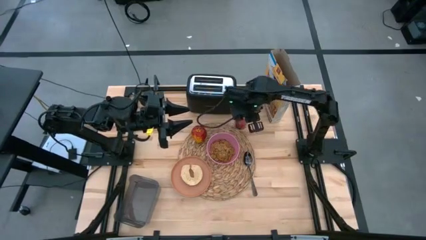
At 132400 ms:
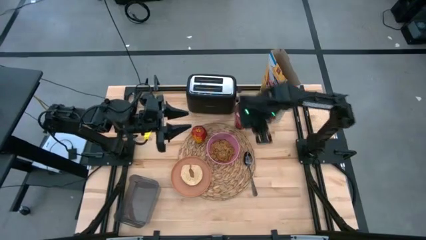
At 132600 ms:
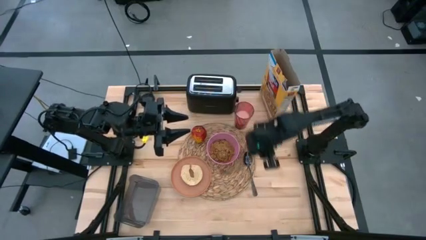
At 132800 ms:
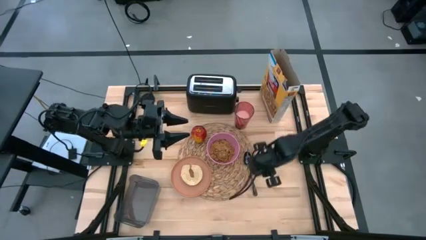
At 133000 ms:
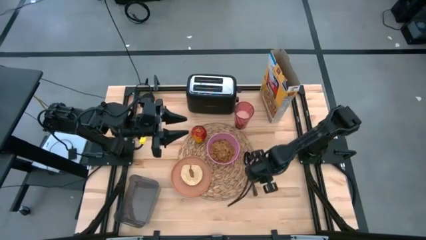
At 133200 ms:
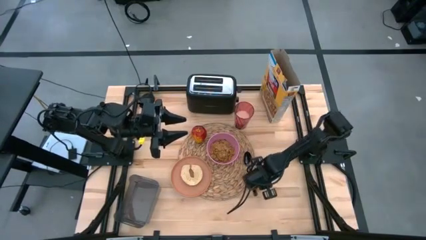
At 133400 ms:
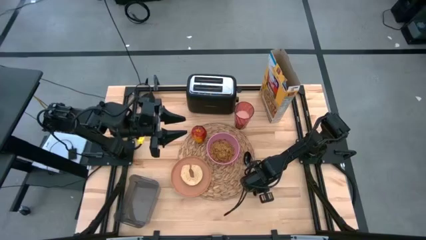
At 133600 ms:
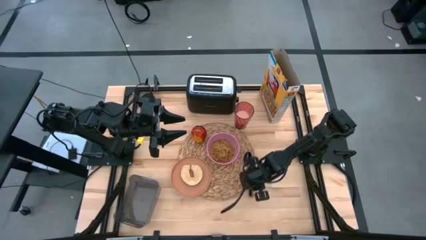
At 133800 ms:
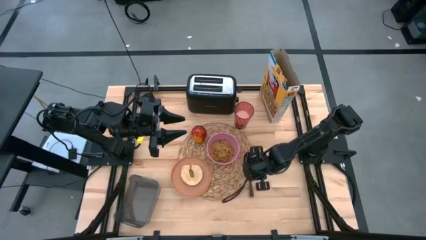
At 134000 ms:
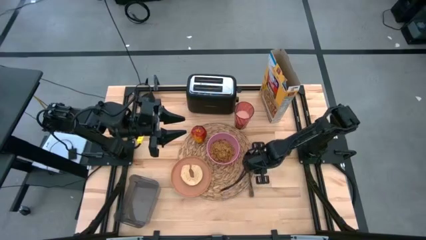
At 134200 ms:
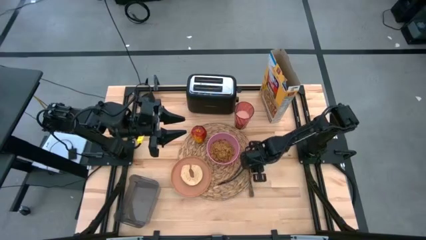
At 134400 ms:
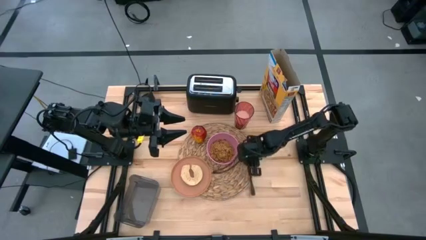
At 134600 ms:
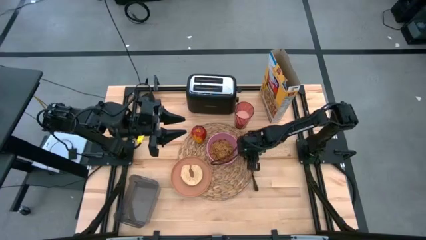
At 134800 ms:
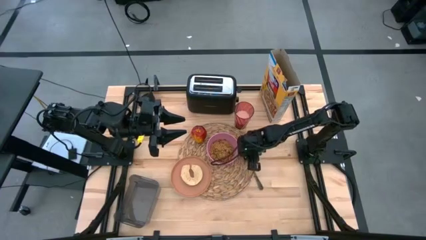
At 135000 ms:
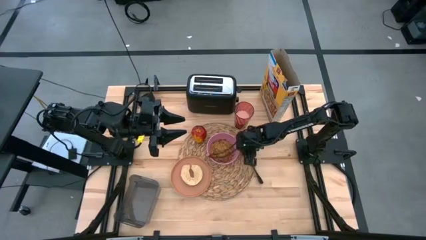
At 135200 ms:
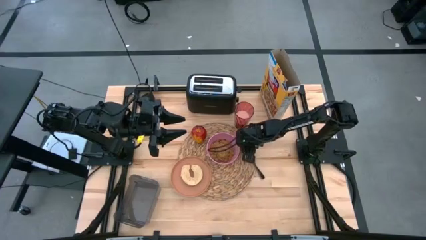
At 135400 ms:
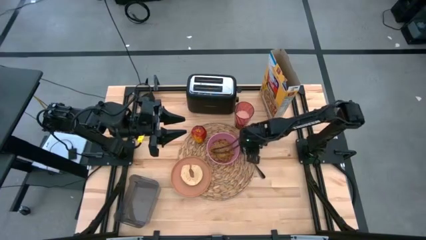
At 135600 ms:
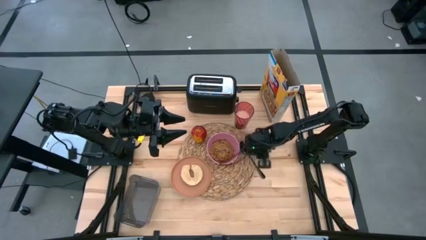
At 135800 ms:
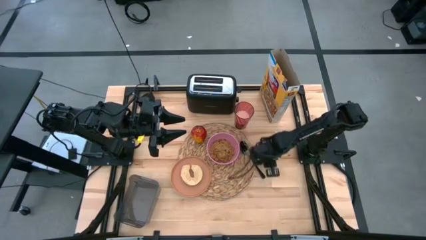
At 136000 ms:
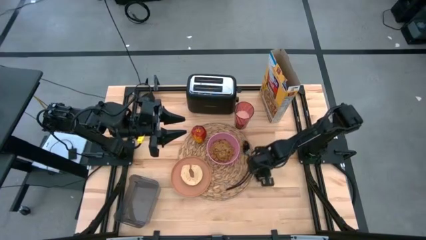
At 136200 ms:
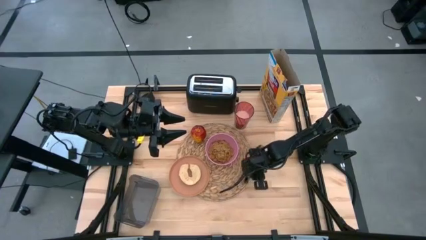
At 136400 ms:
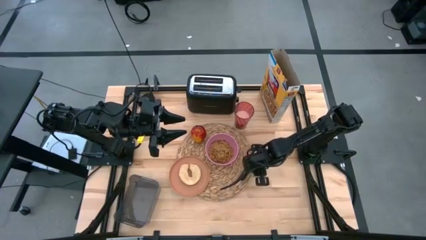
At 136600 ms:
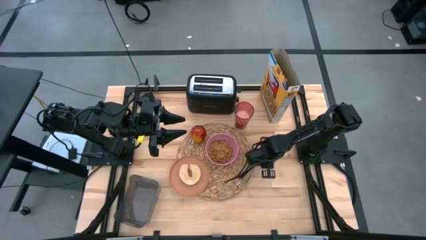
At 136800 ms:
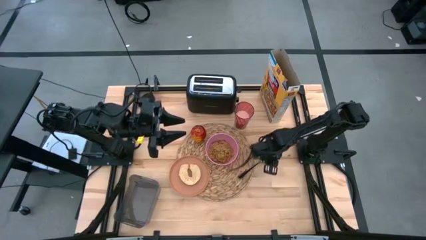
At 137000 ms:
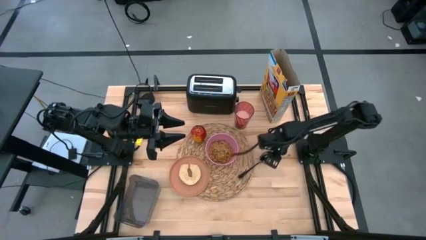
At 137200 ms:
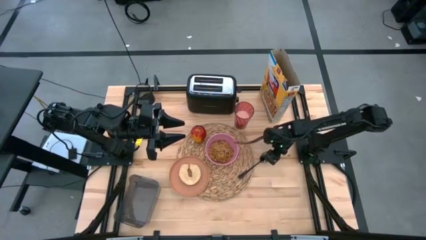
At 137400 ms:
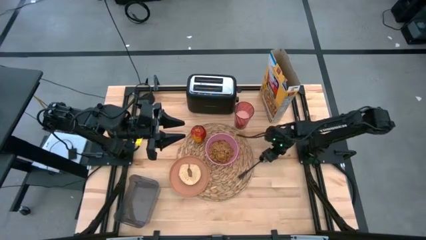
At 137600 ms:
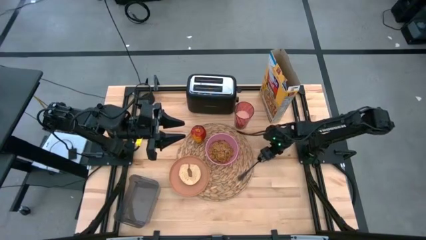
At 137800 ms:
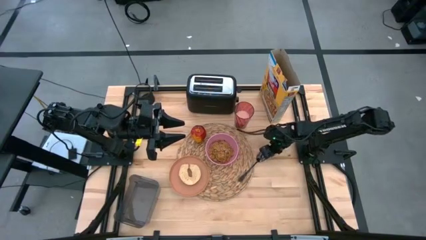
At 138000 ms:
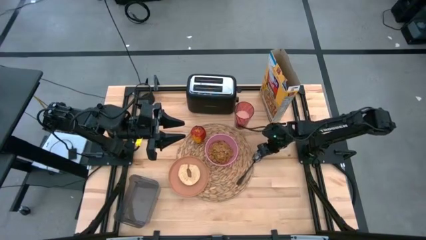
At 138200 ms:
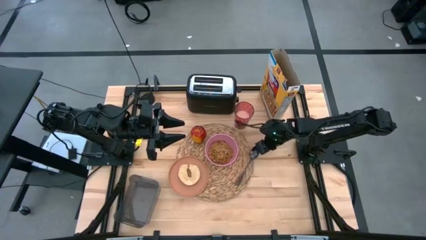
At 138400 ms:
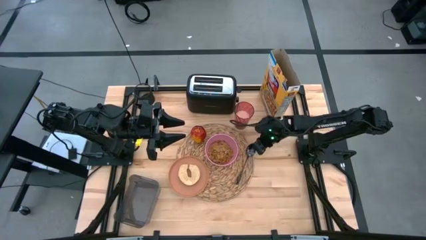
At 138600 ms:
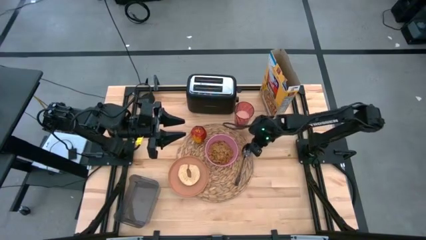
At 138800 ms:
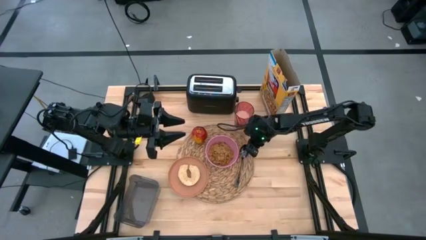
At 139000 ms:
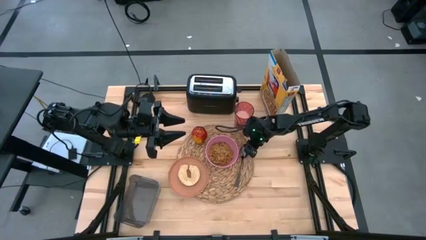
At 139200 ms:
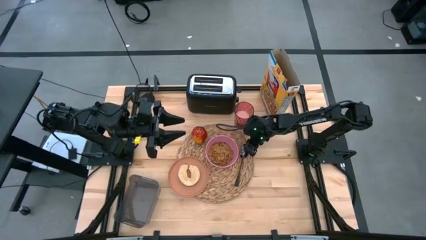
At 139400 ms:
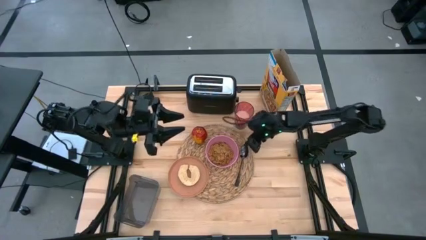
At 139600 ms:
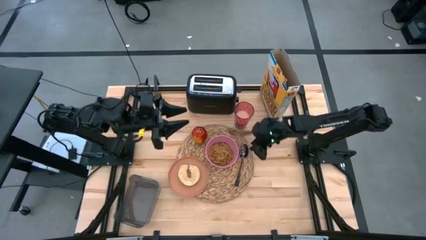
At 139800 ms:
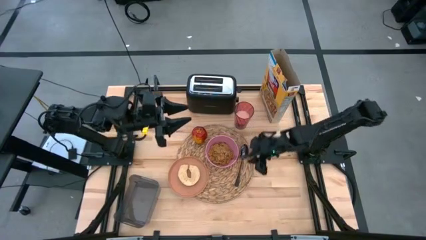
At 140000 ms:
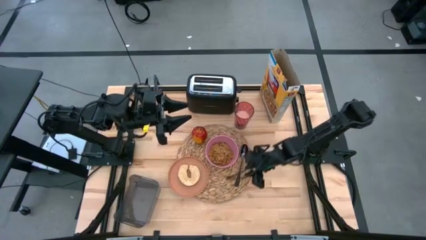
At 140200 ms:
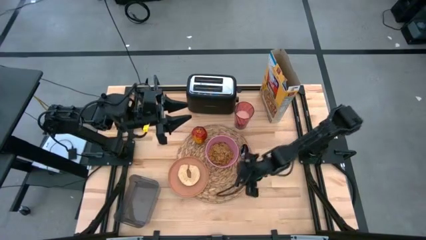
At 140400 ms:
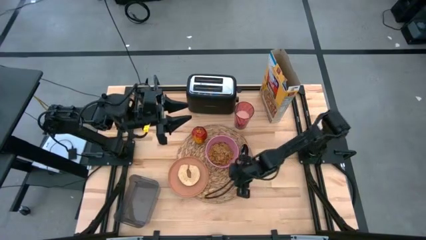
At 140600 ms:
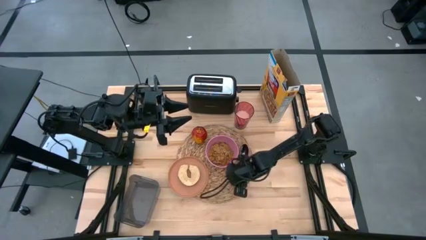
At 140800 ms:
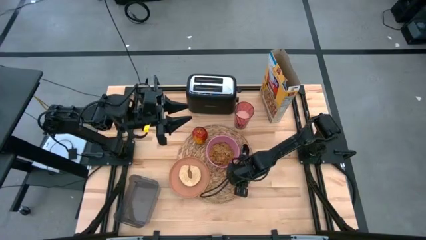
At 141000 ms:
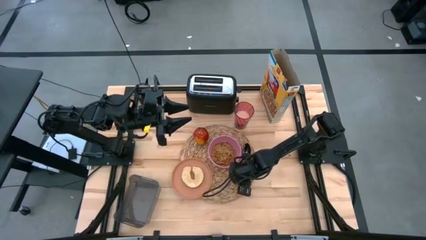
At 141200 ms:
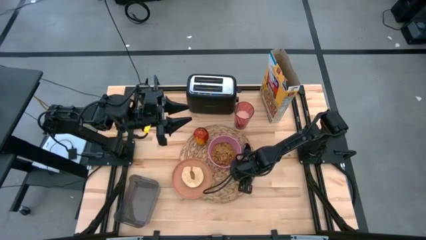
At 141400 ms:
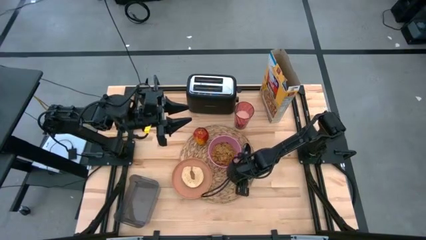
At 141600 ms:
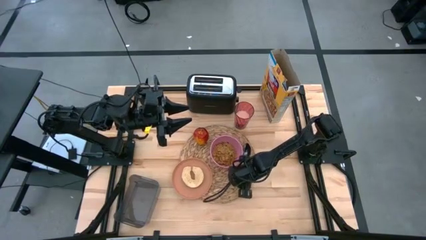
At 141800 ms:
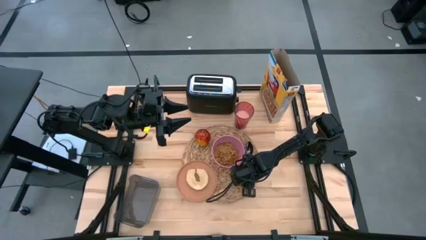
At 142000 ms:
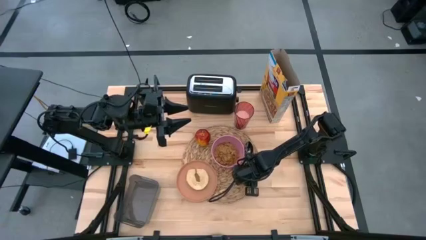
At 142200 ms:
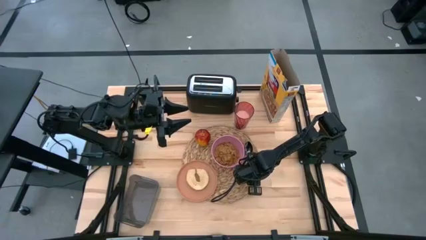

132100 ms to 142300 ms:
Task: Arrange a breakfast setting
Adjust the black spoon beside the pink bowl

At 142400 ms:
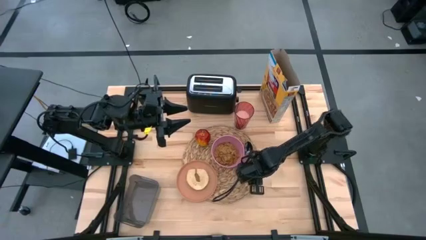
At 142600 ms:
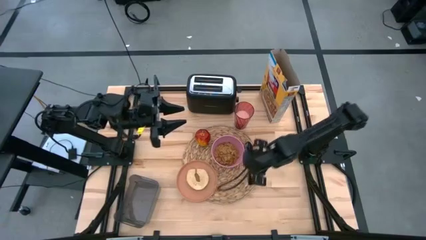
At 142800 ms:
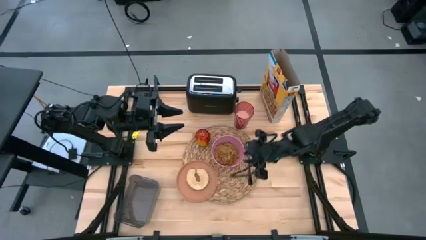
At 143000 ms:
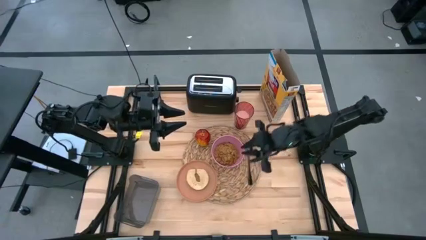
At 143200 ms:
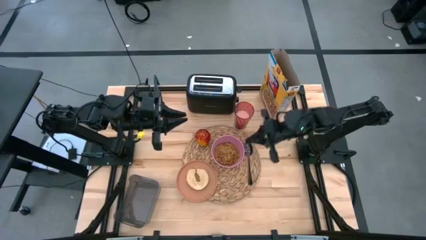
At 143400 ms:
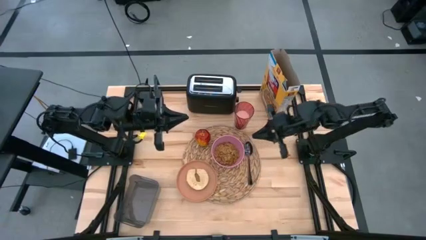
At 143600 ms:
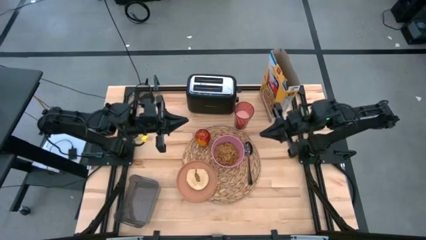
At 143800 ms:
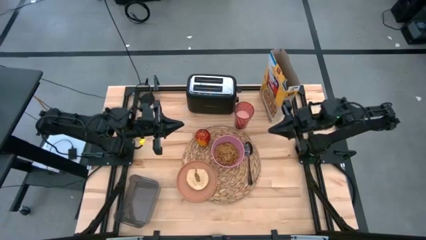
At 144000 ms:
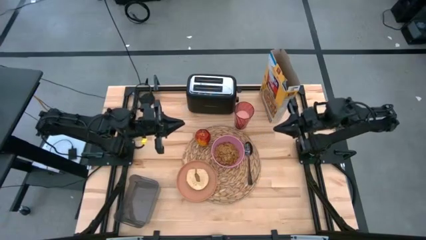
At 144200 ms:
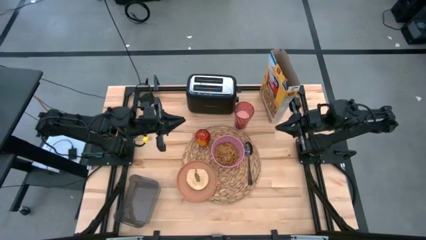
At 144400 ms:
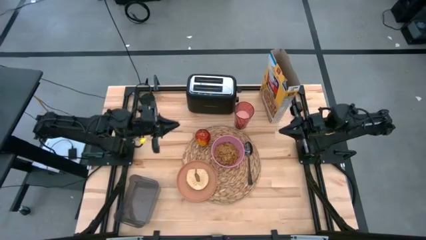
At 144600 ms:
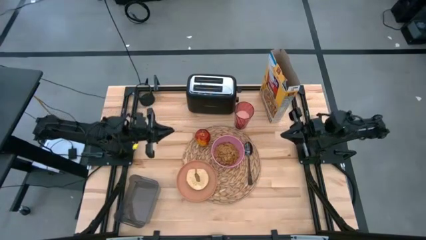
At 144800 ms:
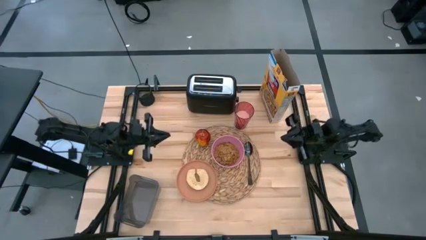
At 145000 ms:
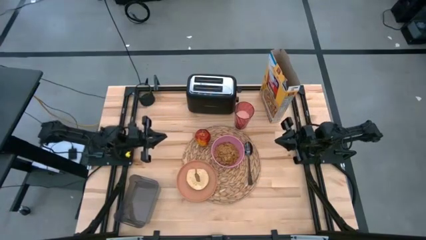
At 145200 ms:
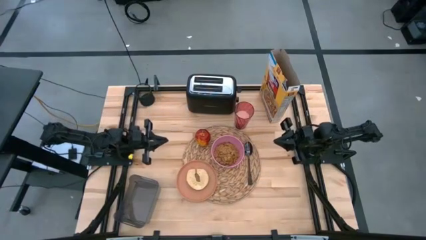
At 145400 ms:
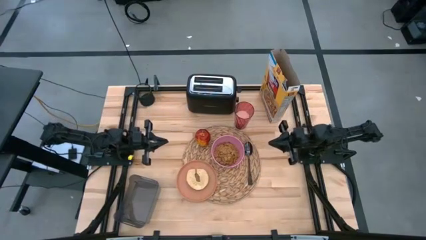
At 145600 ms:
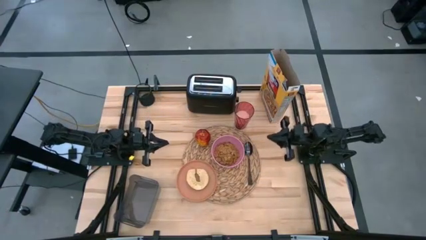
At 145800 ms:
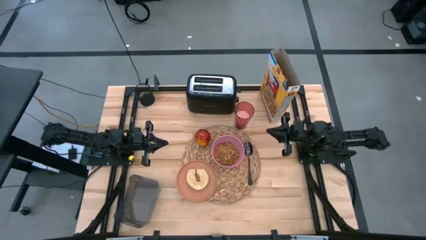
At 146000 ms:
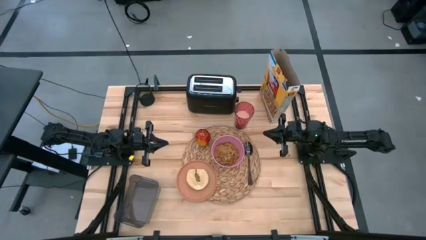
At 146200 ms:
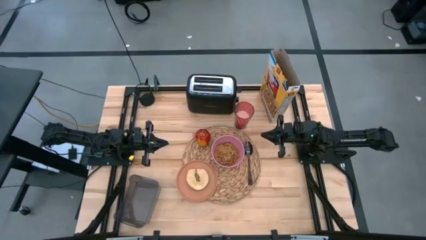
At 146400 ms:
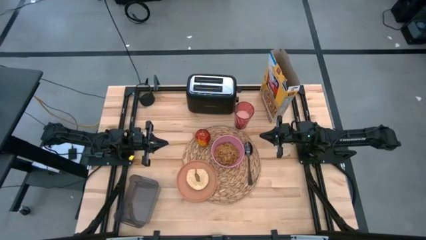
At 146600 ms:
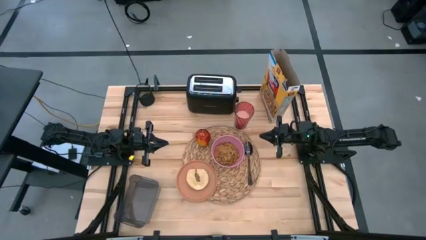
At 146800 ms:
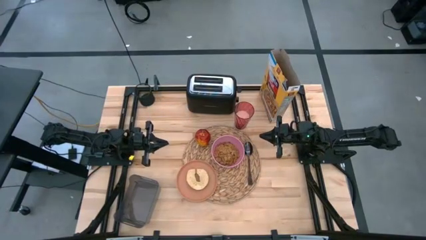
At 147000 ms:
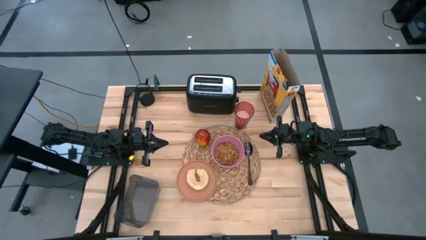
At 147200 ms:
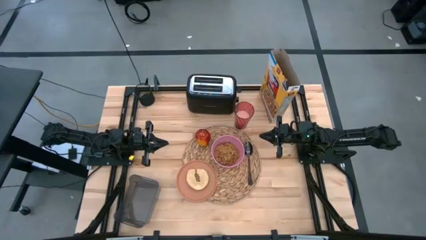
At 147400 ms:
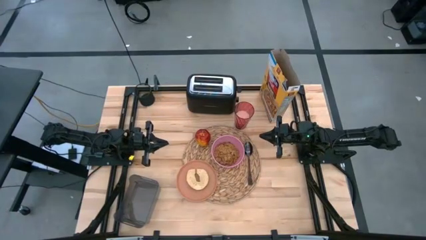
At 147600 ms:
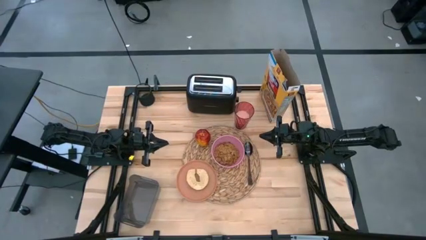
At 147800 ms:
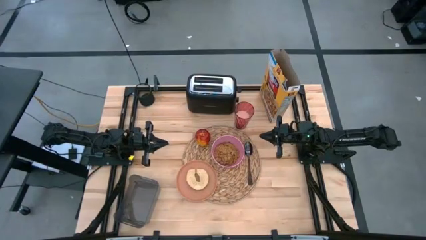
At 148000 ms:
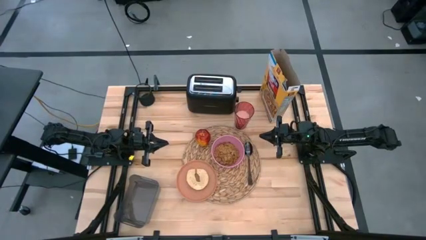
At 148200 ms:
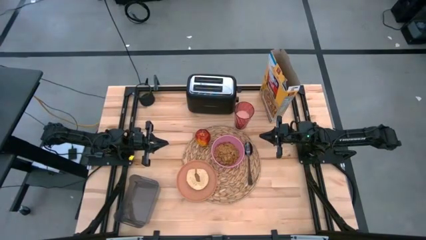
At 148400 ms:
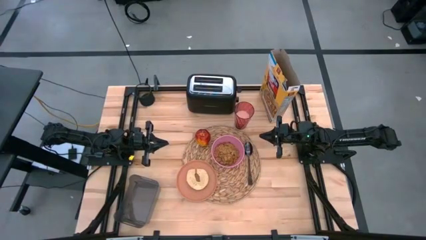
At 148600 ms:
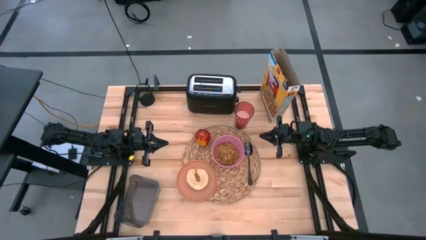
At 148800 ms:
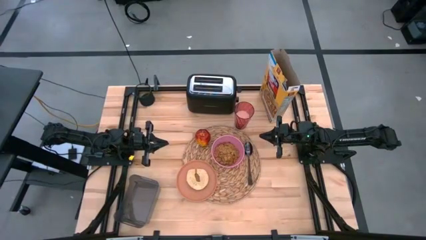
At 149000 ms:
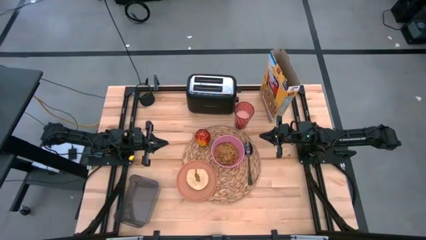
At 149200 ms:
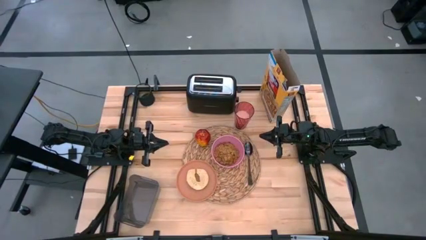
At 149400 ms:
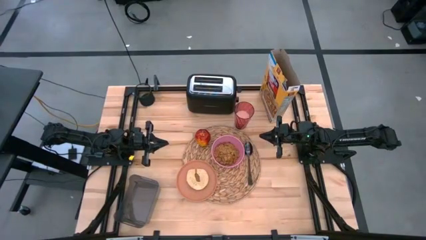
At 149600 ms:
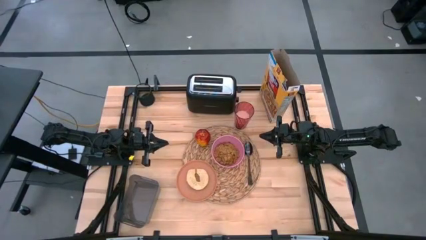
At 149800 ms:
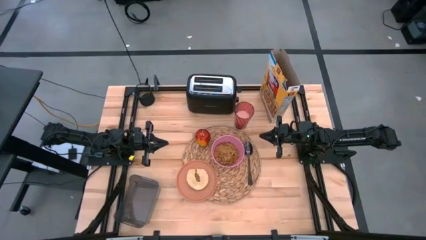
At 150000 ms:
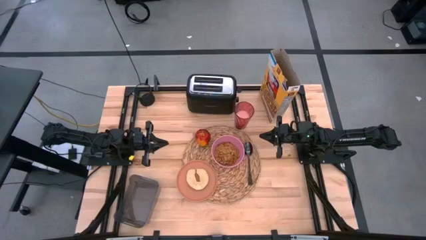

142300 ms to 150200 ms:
Return to Home Position
